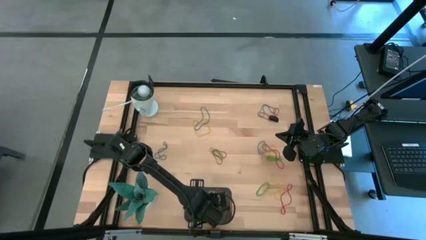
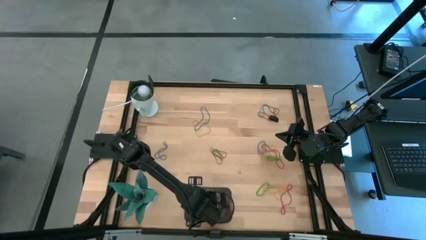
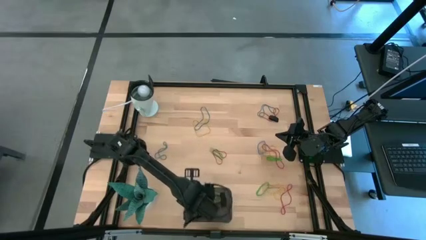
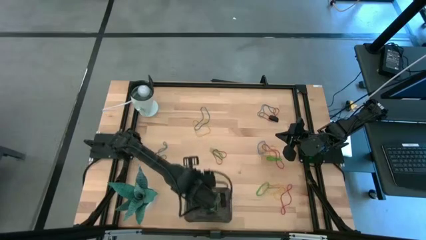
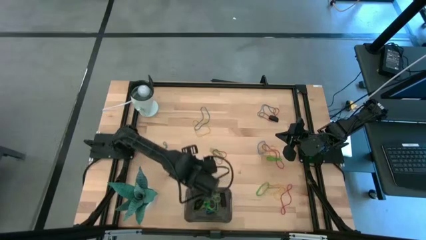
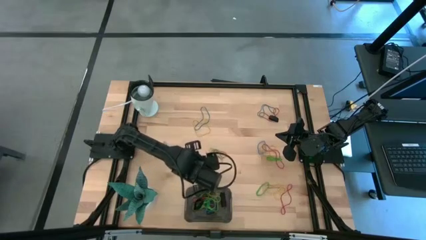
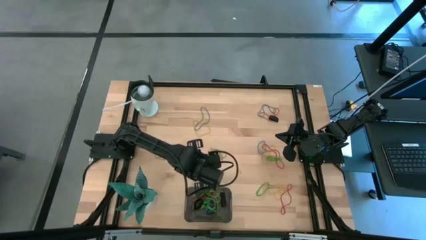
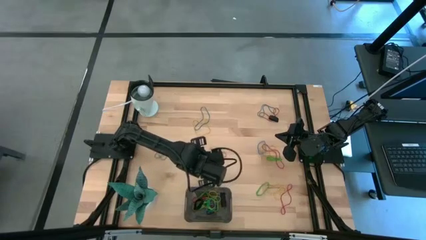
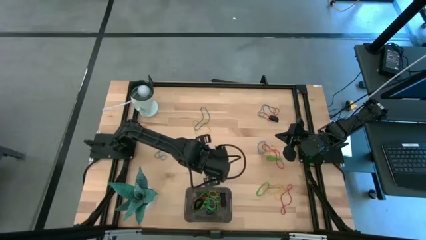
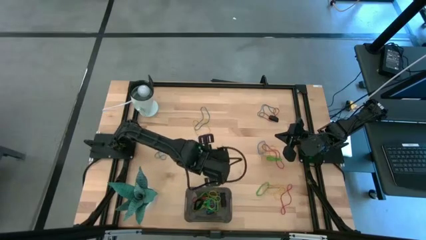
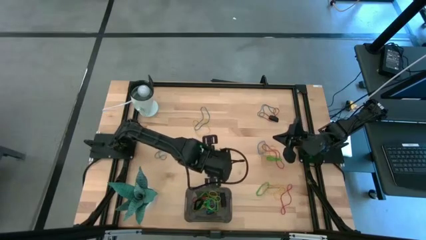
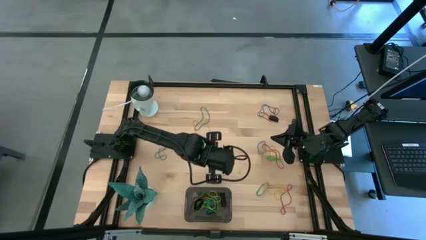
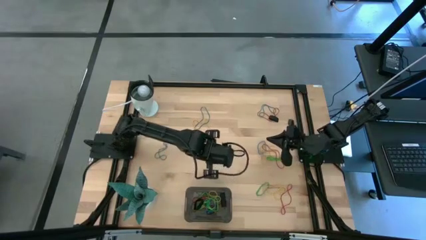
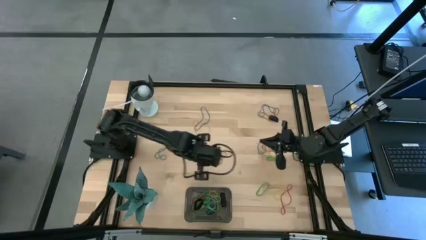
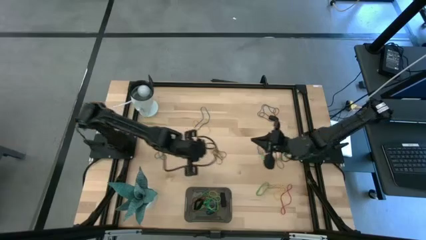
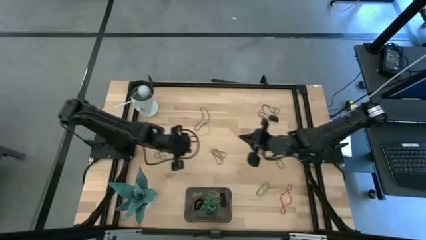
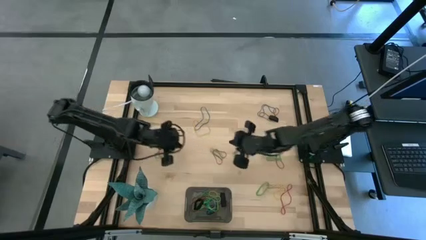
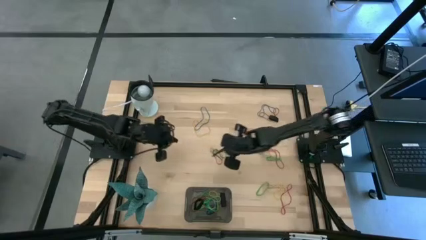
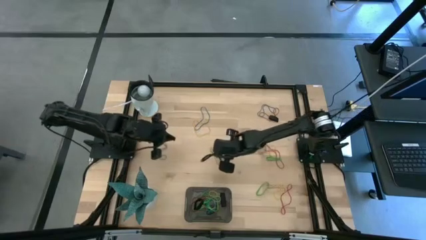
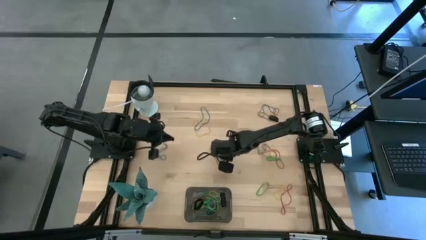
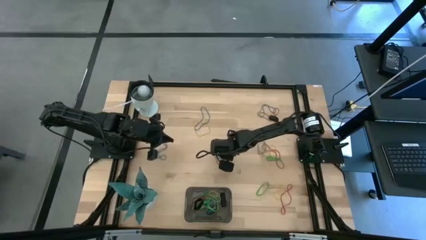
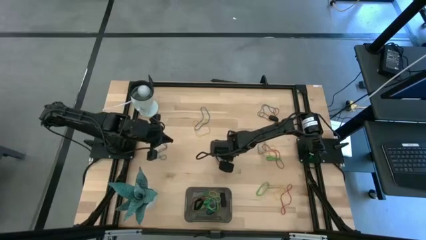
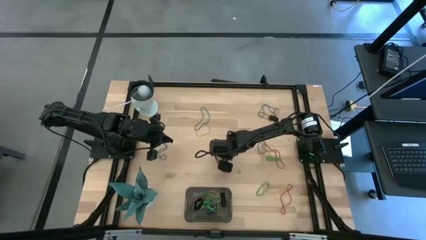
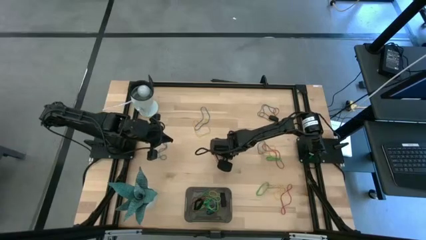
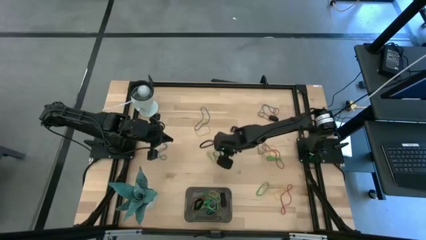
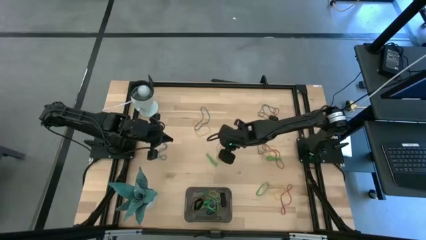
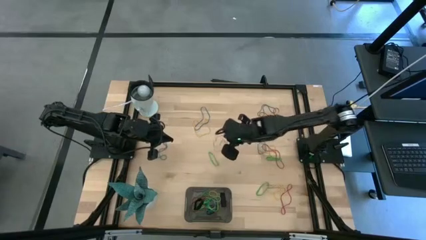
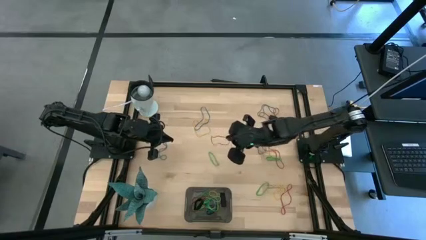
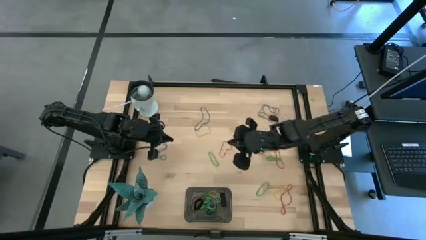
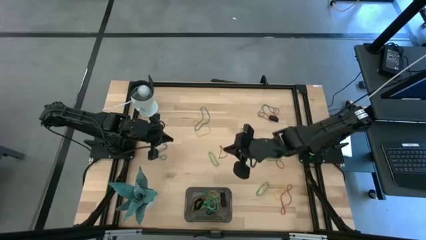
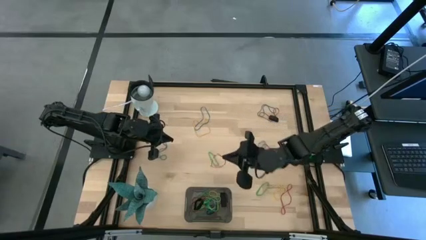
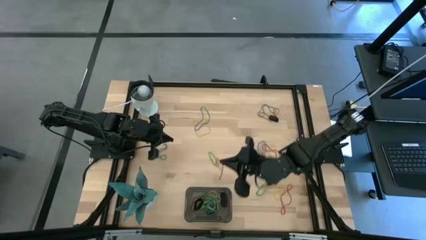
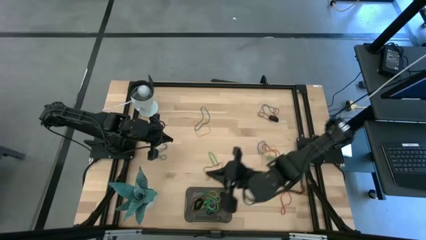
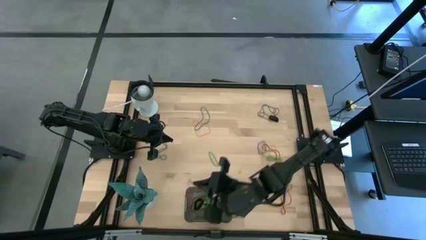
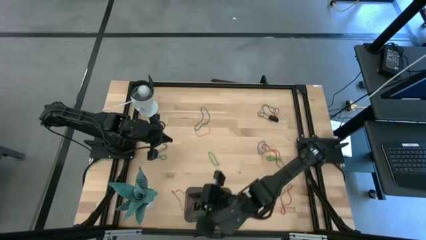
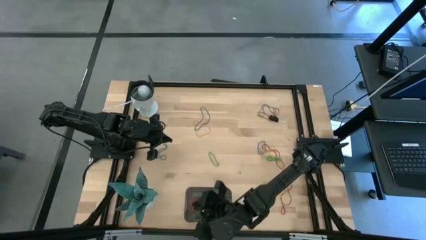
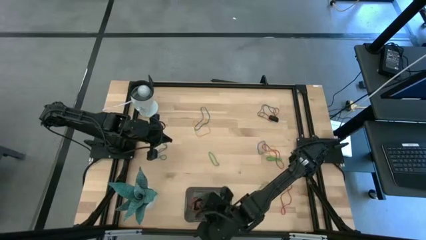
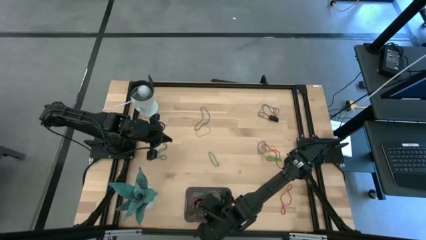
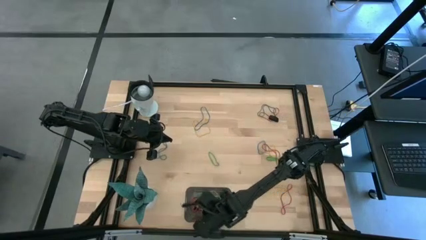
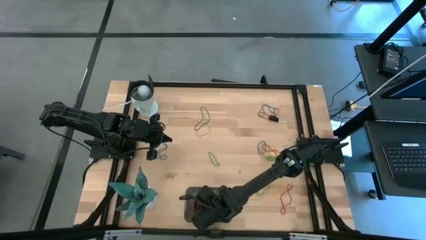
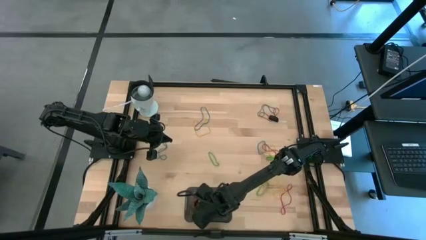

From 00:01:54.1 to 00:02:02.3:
Task: Pick and place rubber bands into bin
Put the red rubber band into the black bin

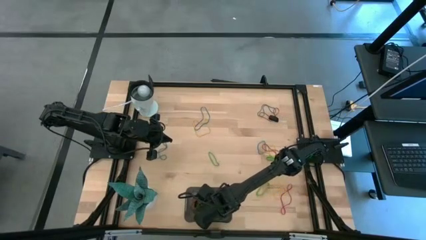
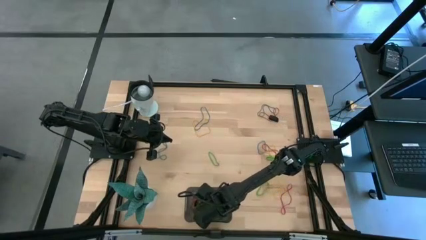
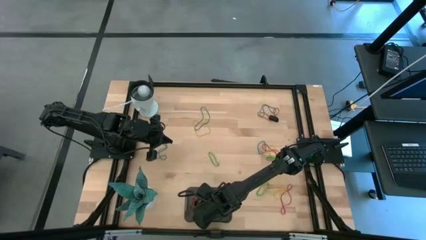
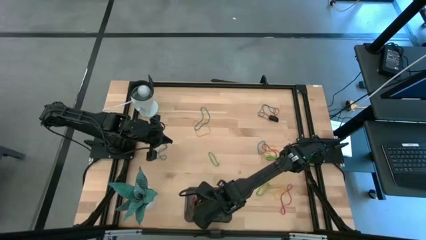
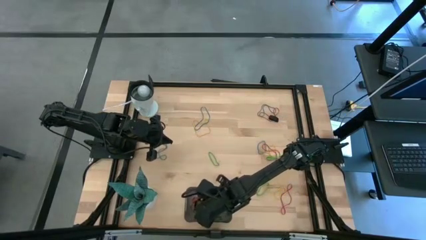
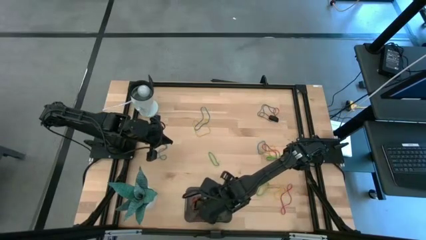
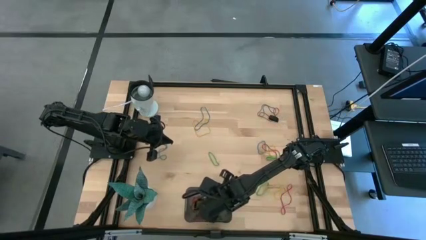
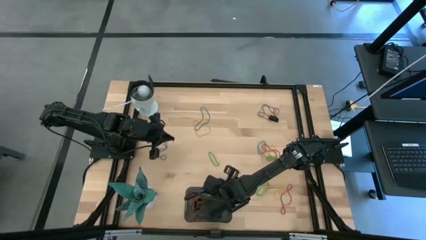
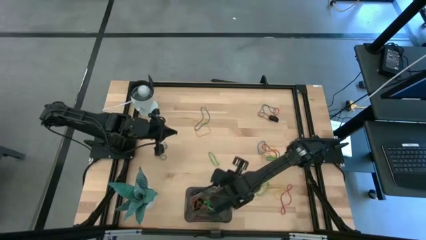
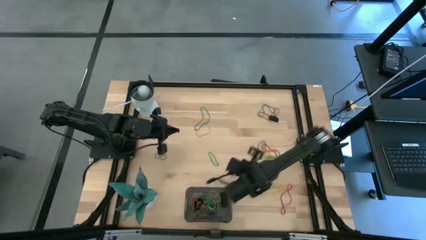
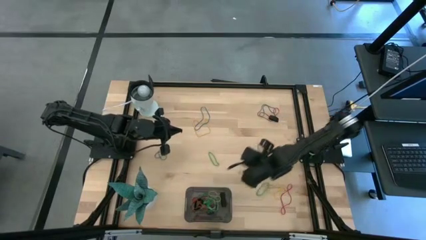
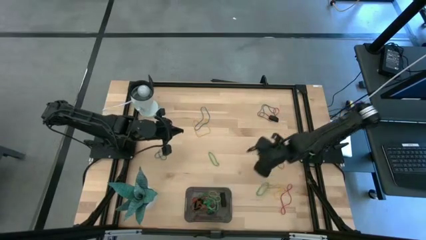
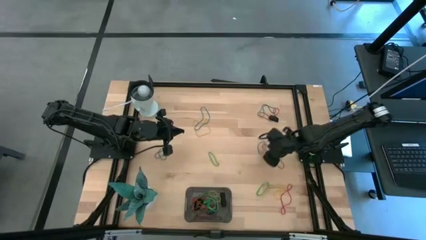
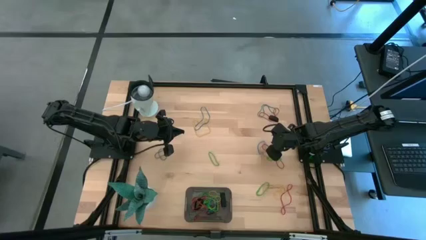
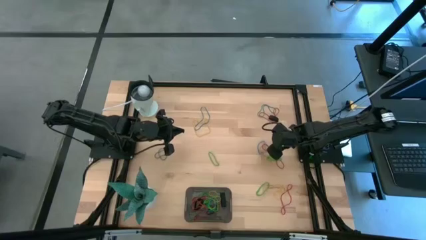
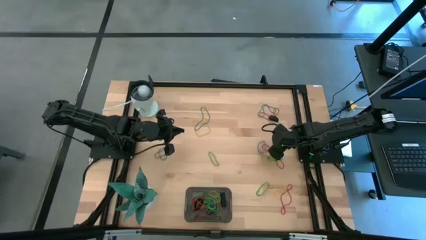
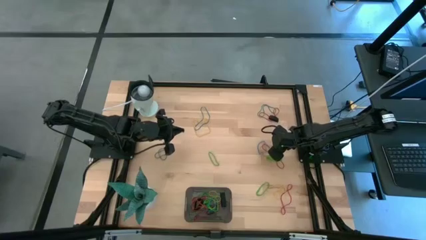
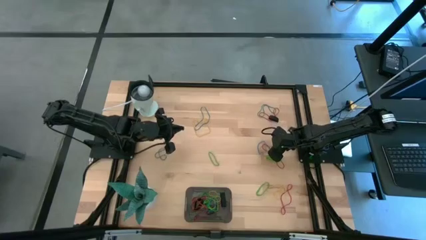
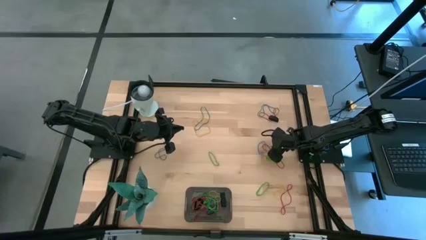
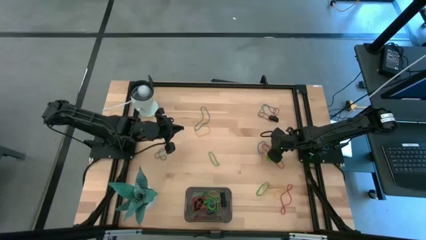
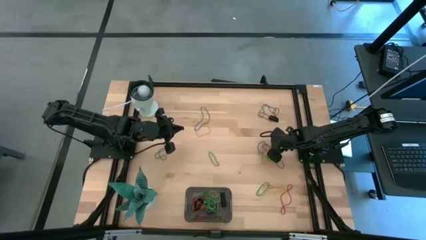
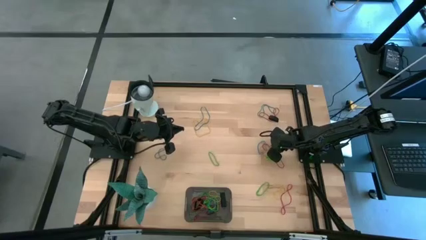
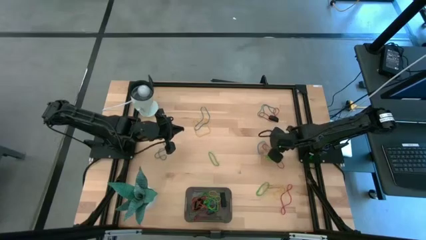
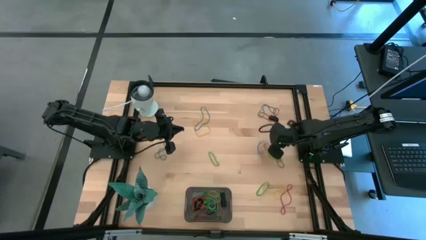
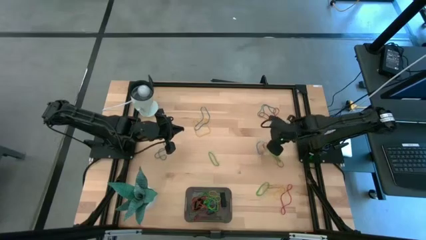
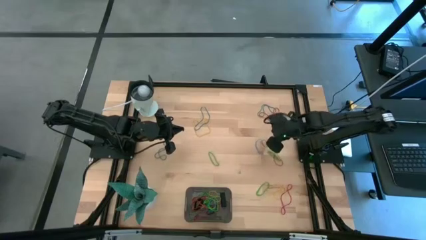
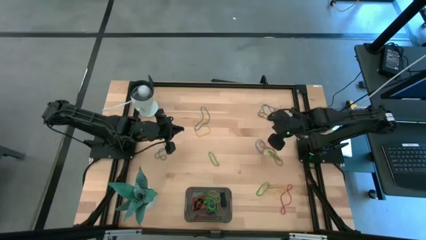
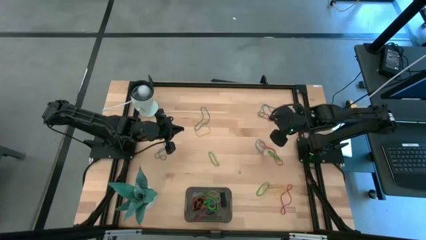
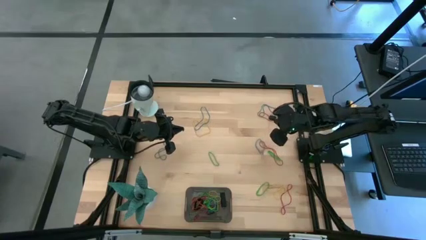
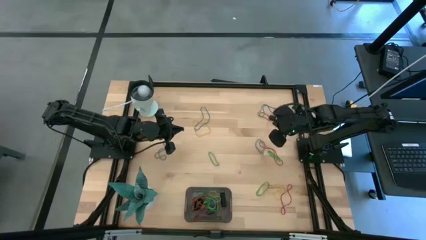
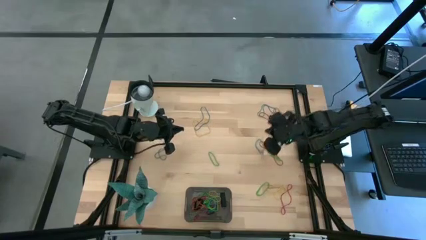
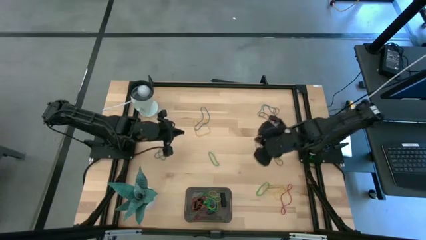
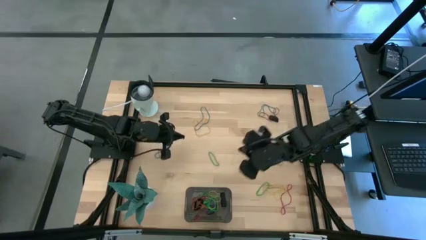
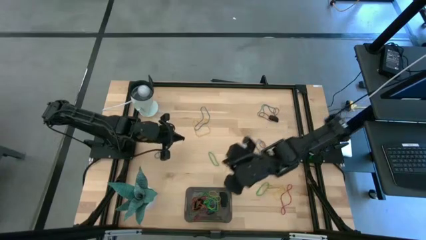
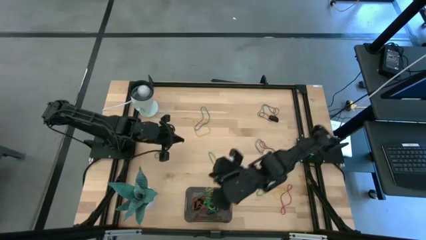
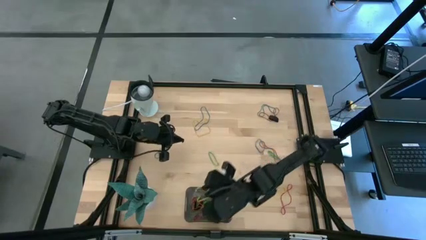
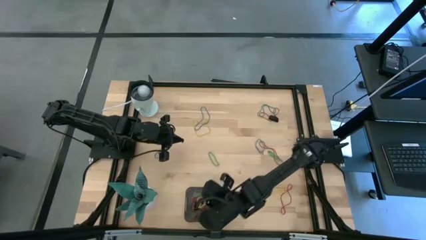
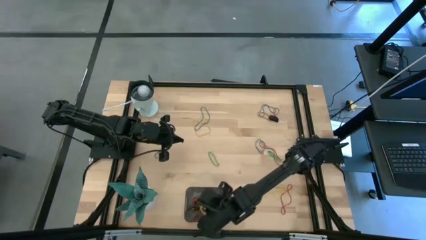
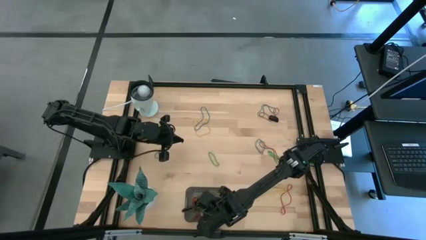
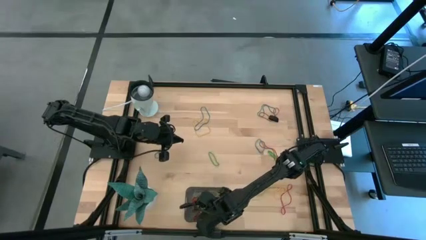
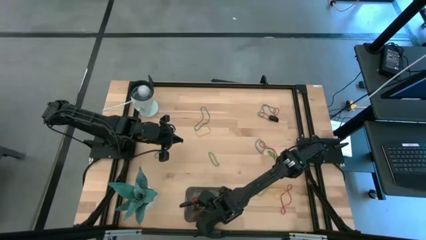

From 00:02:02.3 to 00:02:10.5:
Put the yellow rubber band into the black bin
